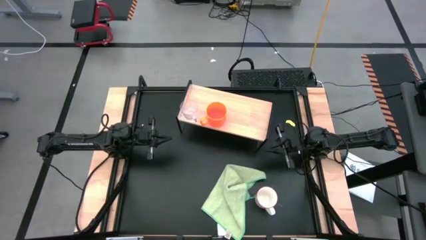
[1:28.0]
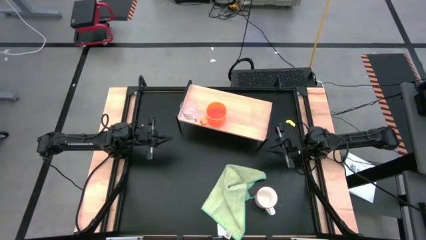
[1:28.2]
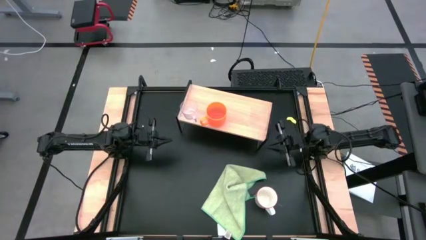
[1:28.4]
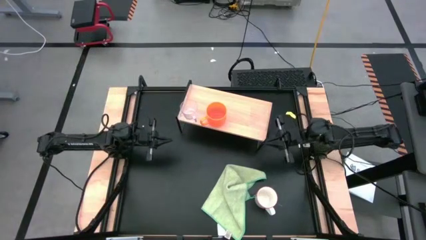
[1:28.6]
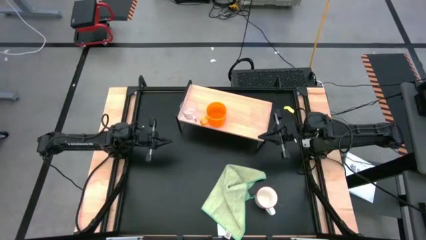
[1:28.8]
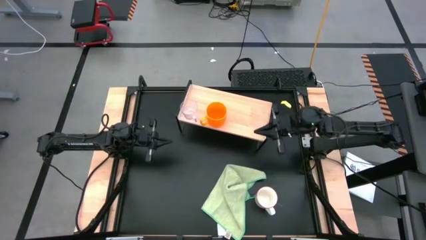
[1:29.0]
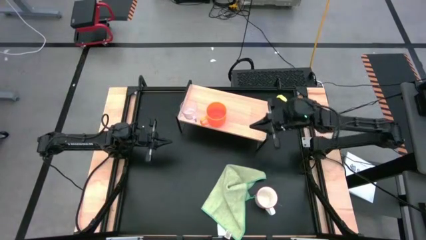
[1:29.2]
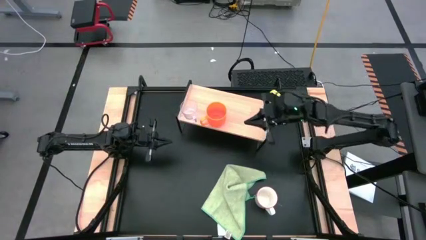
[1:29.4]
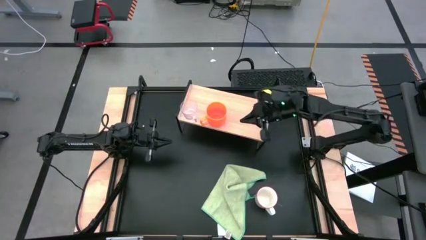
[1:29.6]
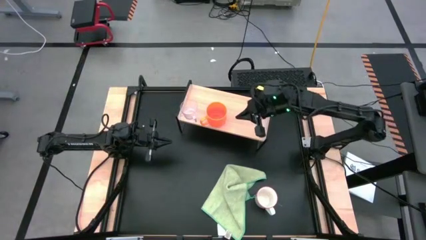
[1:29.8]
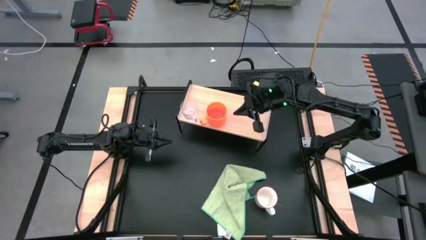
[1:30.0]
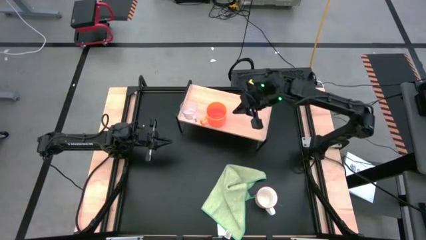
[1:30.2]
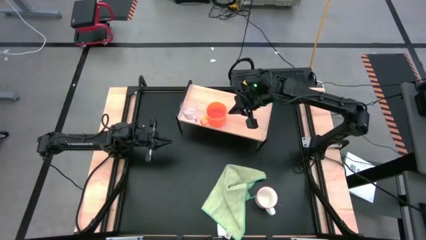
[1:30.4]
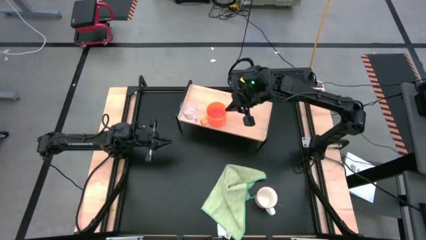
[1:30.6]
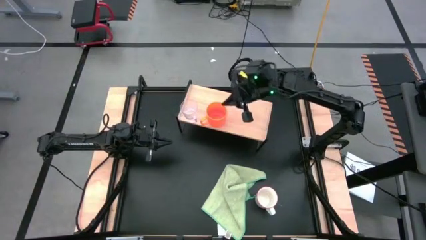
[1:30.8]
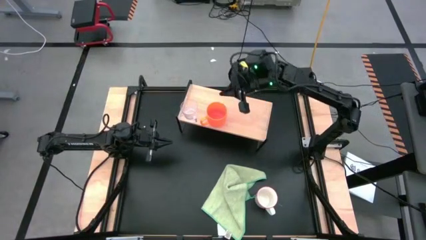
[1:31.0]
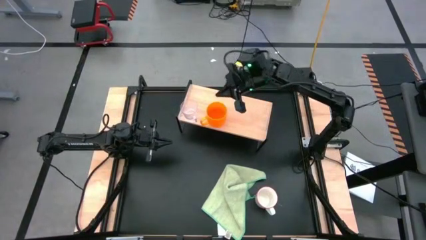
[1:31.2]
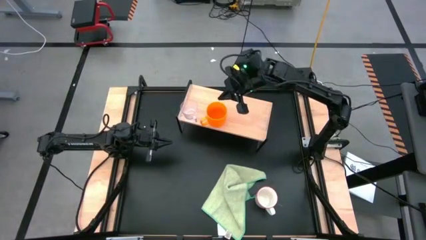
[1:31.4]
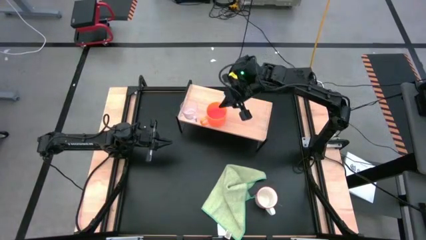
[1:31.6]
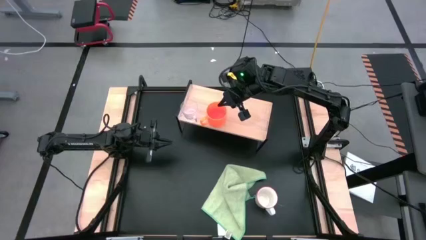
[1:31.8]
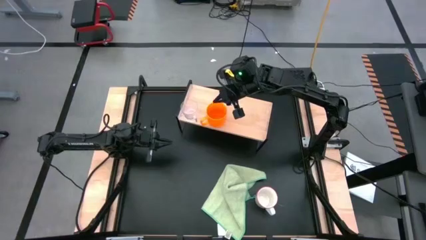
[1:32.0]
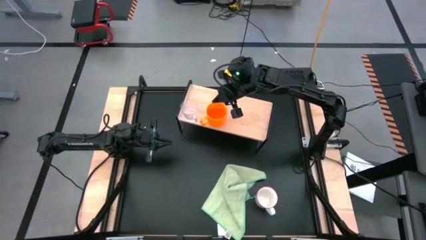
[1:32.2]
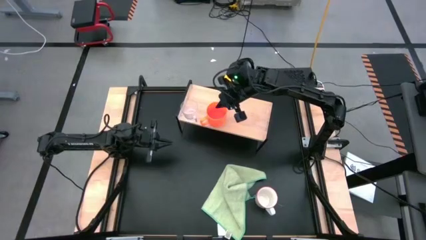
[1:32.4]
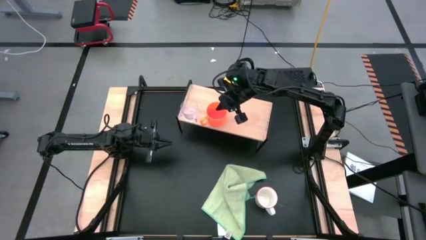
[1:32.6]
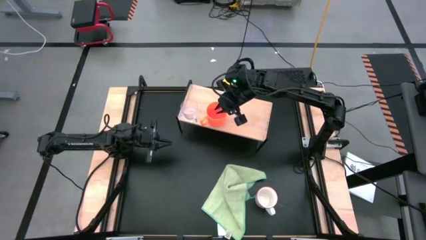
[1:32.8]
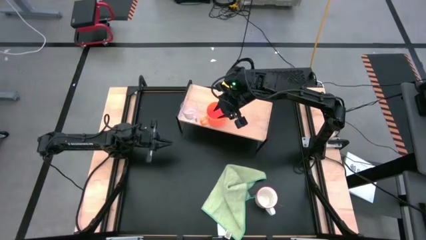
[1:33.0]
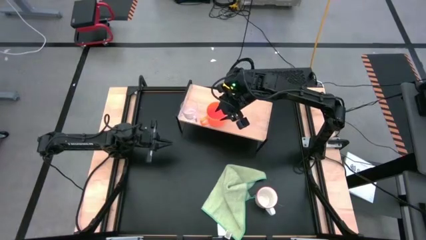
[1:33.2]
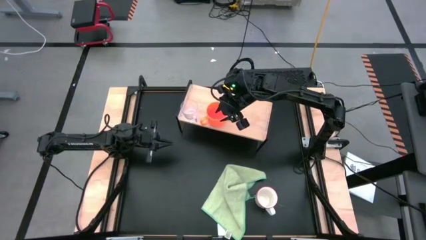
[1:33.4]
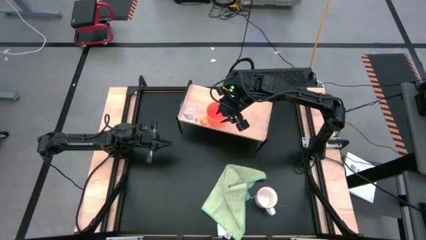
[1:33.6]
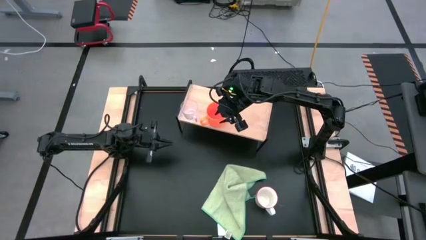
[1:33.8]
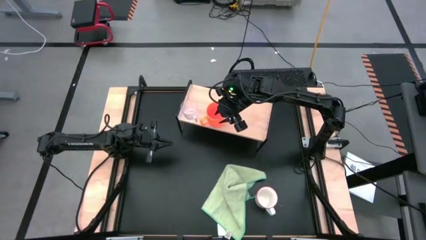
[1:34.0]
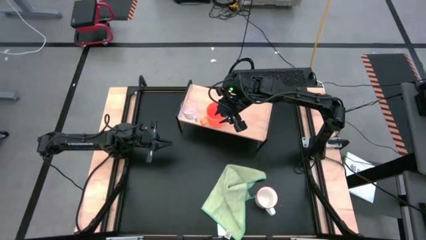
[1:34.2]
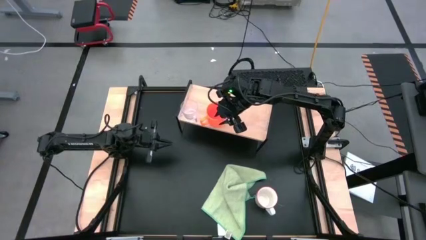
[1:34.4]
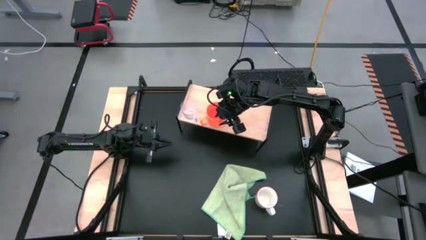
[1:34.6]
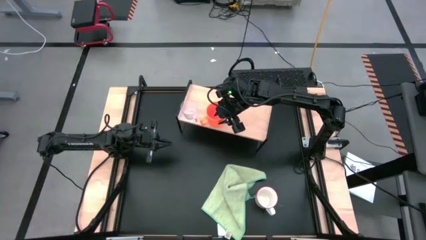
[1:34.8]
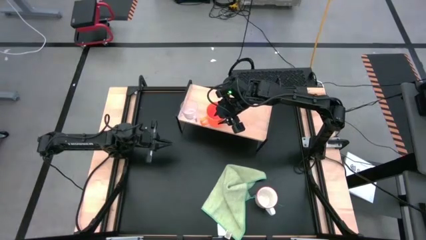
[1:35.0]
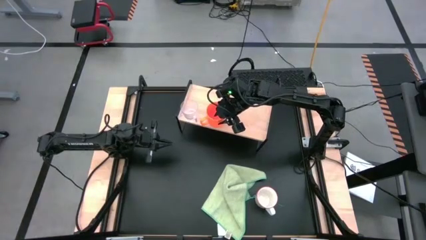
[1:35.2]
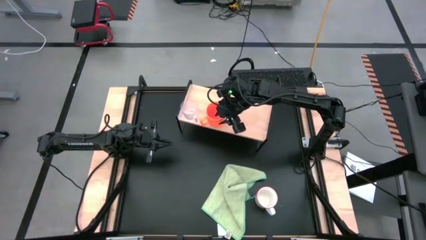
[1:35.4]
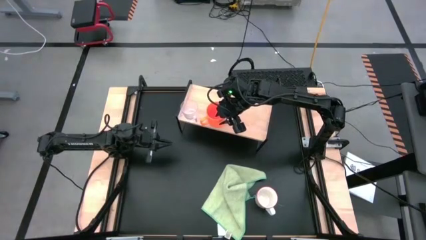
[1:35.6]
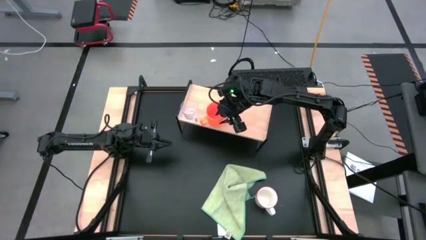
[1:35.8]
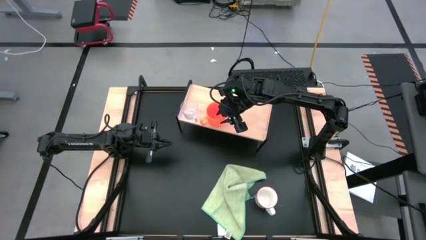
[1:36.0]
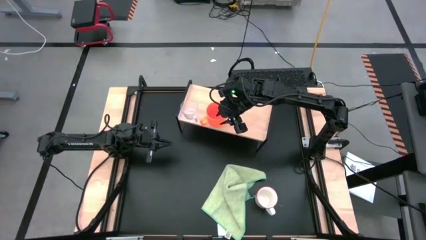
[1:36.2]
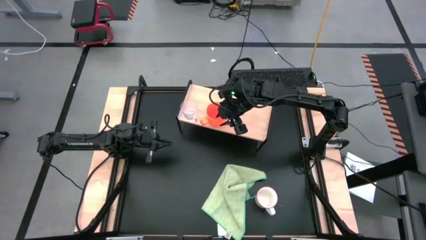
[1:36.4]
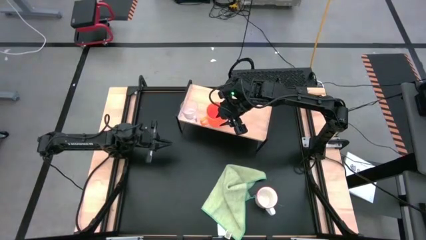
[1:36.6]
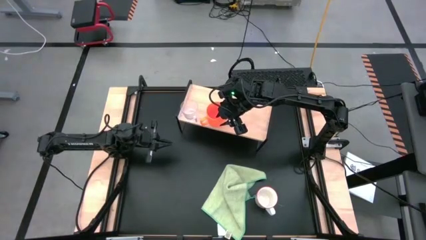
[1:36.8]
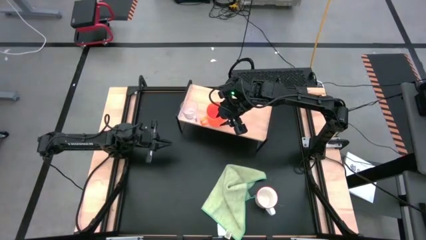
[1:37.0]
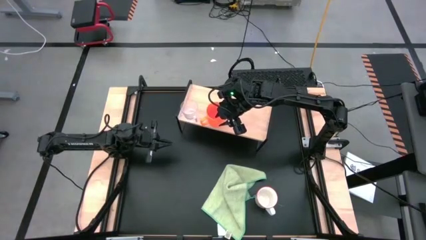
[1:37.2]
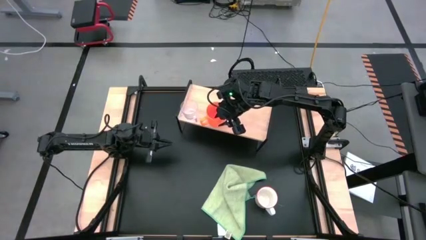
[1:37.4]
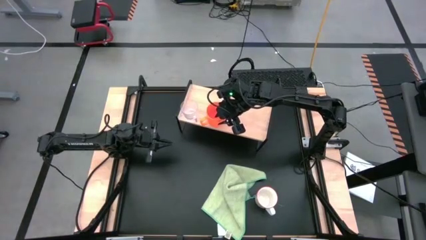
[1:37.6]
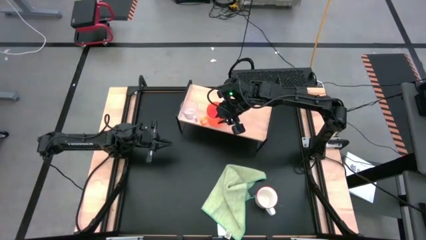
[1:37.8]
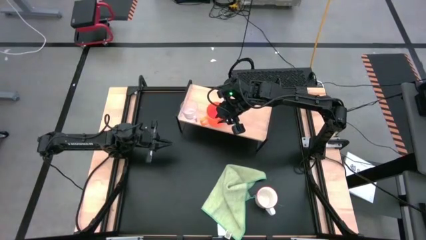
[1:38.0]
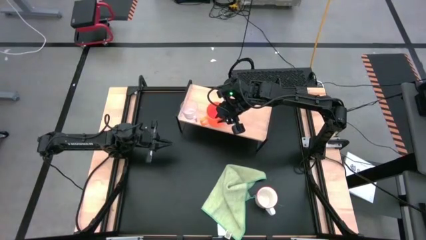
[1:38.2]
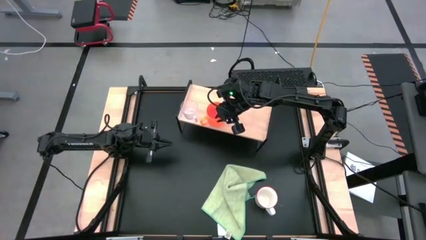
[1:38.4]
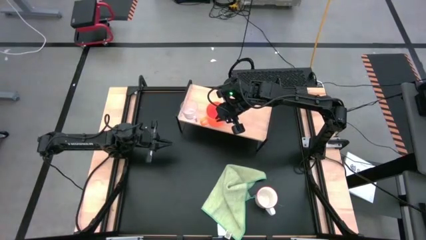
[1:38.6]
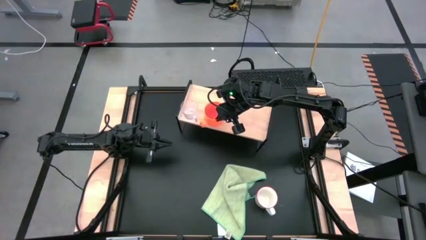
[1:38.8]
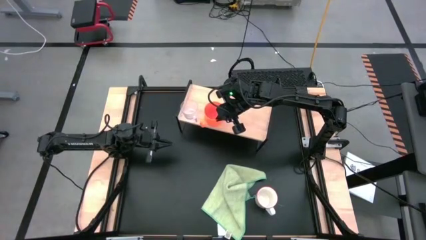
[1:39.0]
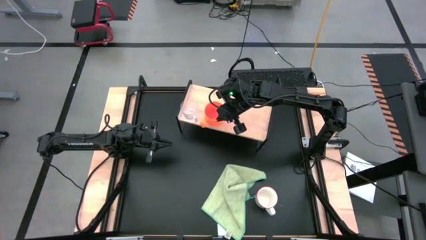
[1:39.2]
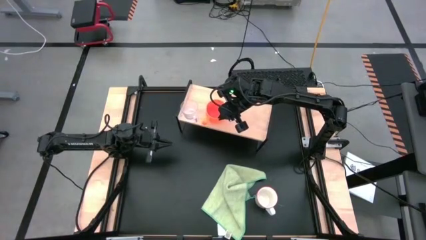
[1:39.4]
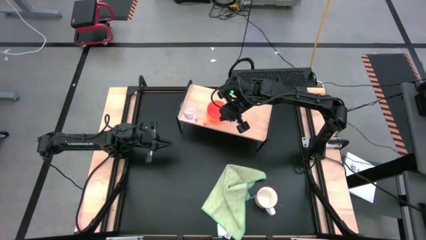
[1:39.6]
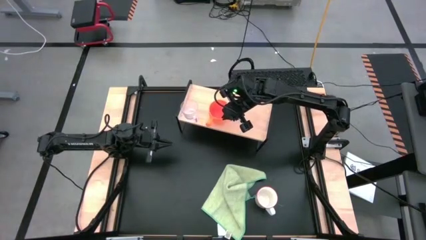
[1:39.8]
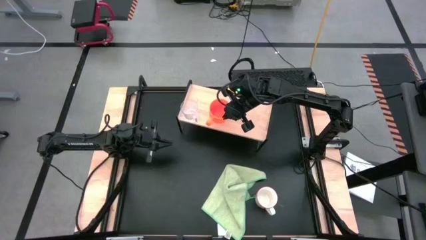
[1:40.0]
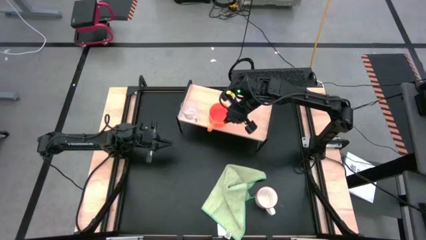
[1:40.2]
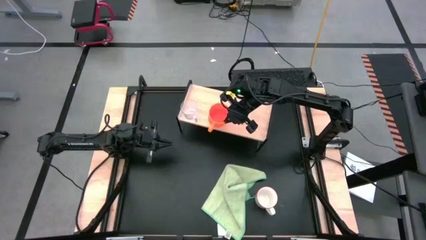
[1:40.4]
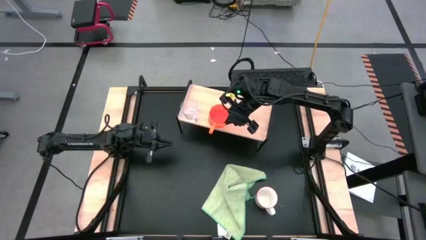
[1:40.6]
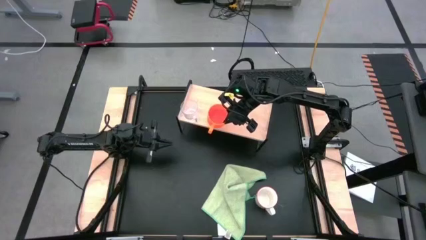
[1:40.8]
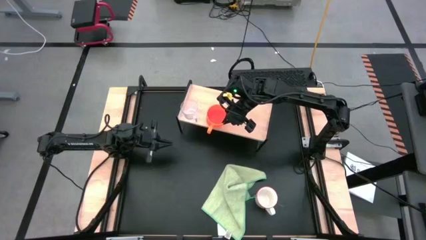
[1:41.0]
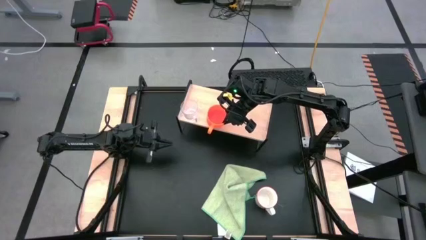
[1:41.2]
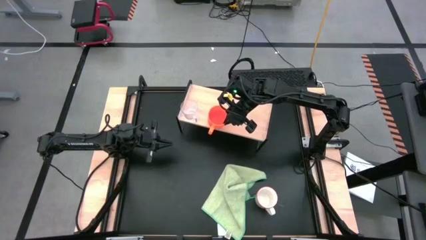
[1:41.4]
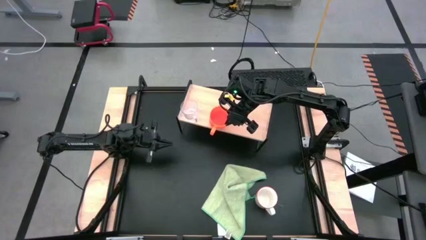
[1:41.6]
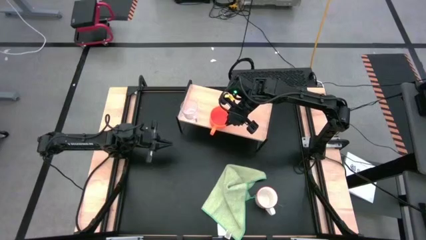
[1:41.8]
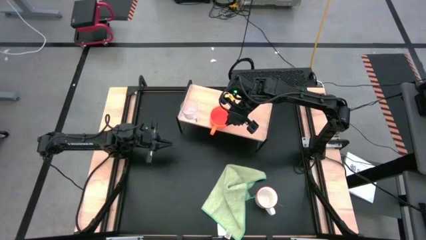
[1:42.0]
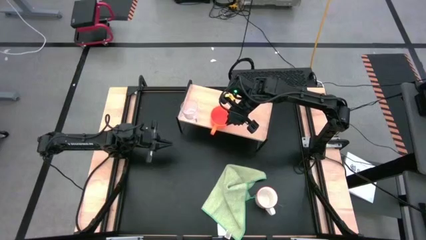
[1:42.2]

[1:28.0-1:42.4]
Task: Stack small to large cups/mugs on shelf
Adjust the orange mug to the middle bottom part of the shelf

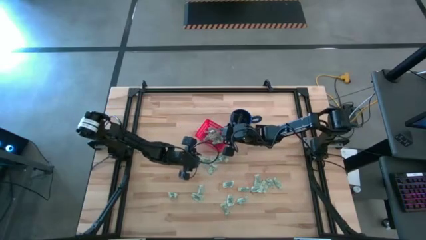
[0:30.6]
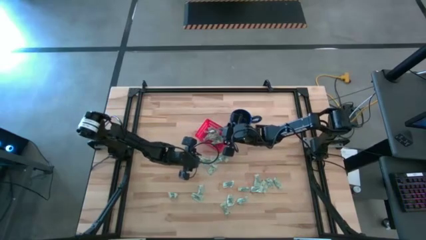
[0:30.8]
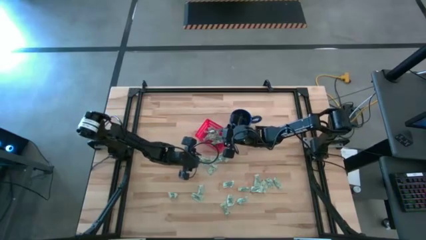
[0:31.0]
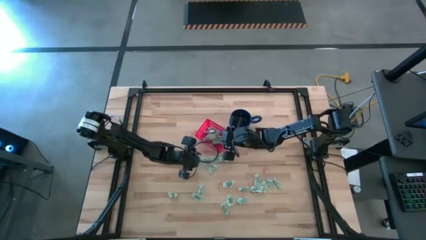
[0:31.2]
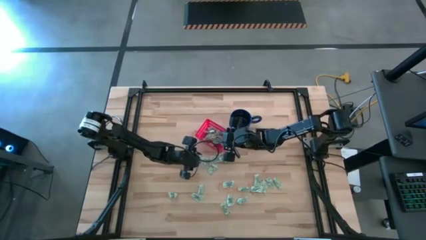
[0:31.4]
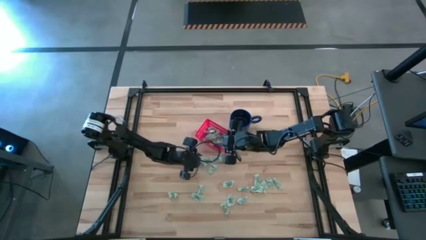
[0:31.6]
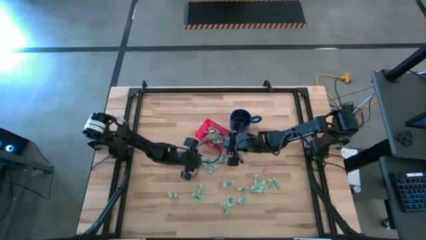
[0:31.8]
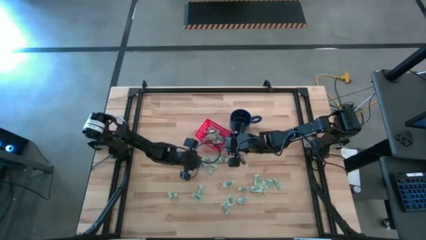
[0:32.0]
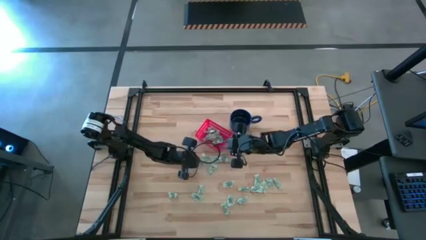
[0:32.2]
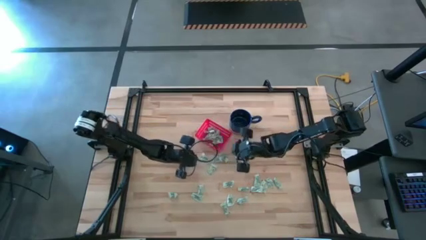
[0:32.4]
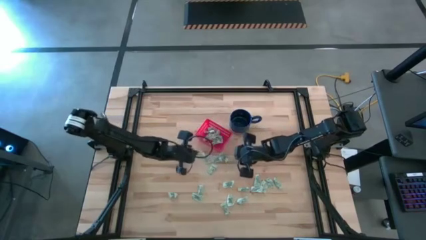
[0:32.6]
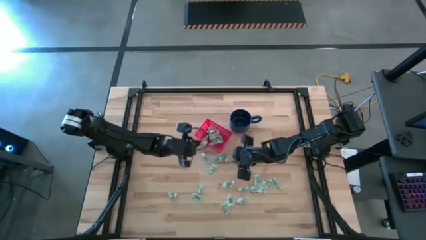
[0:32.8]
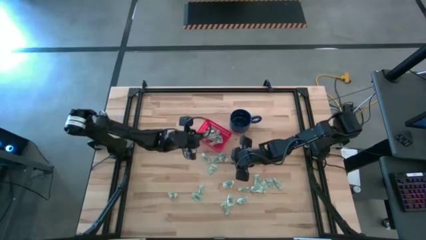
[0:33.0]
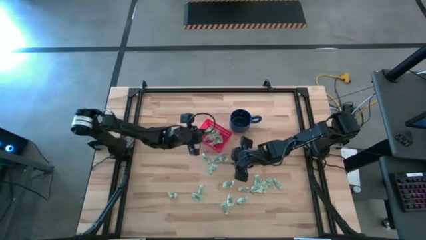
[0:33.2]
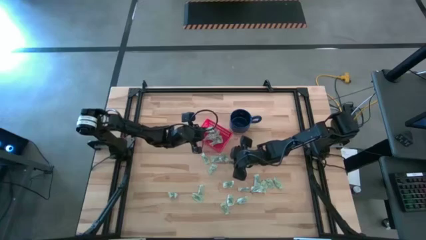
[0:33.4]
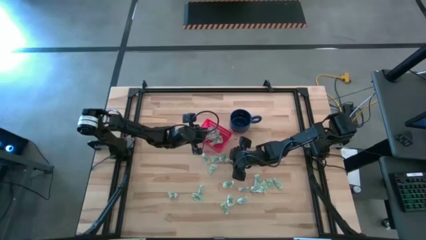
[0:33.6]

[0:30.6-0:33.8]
Task: Pick and place items into bin
Put the stevia packet into the bin
